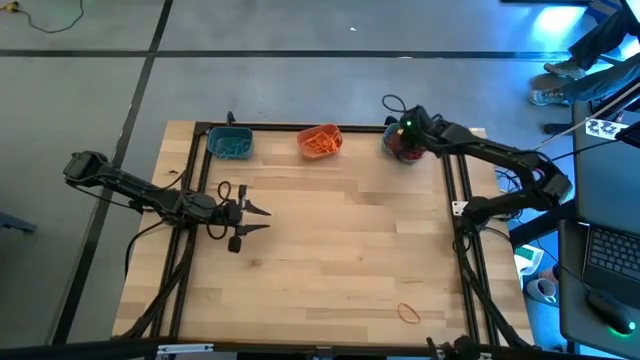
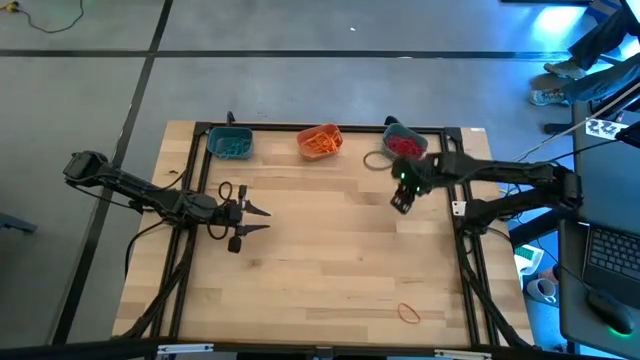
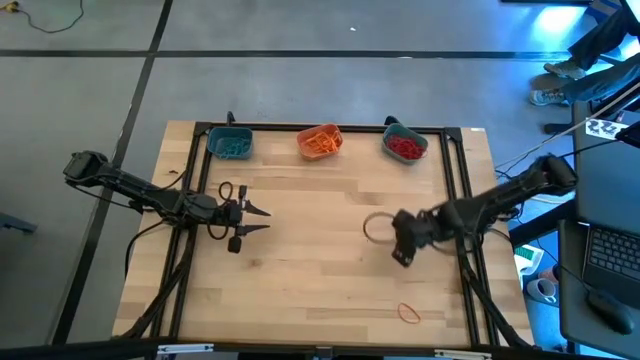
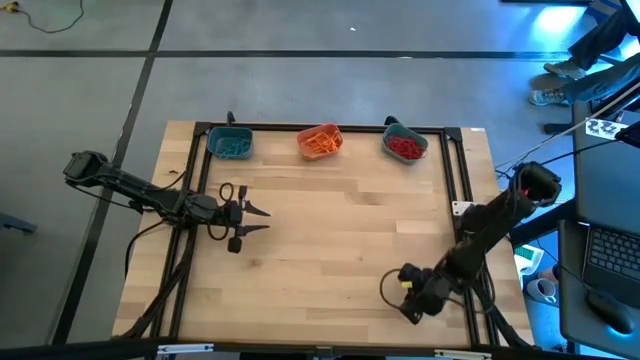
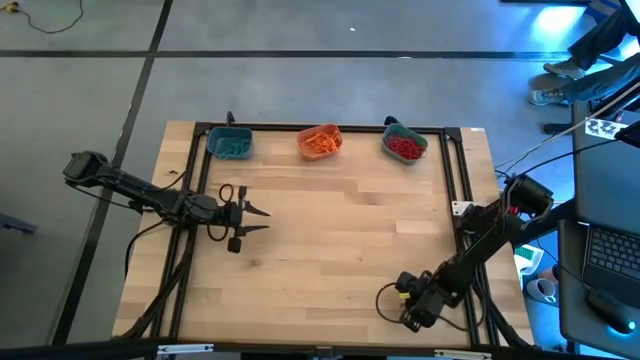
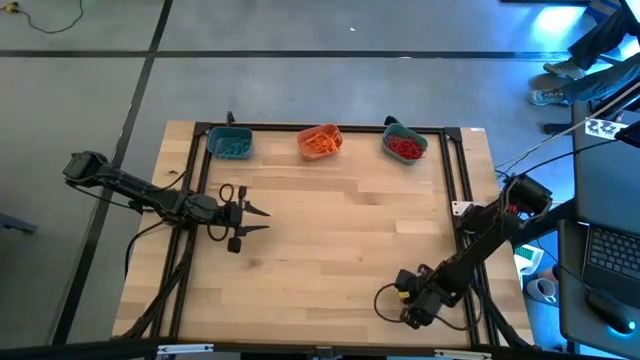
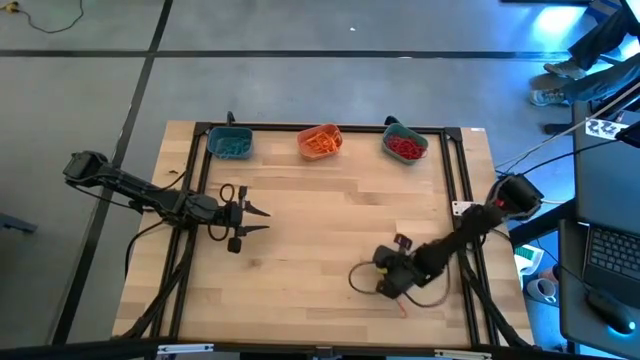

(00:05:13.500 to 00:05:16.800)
Task: Sort rubber bands into baskets
Put the orange rubber band into the orange bin

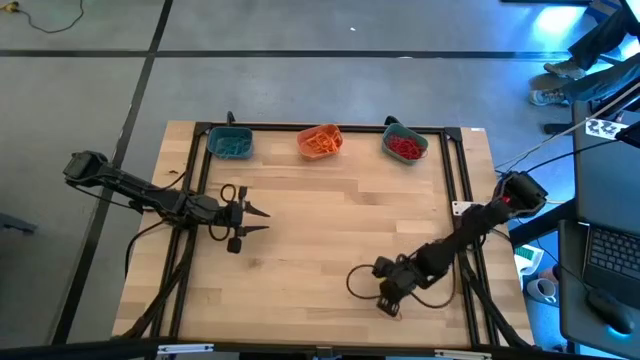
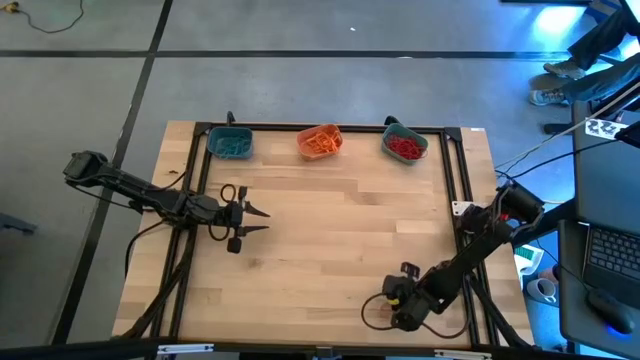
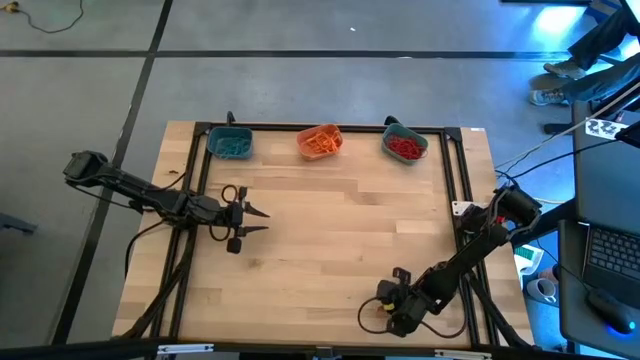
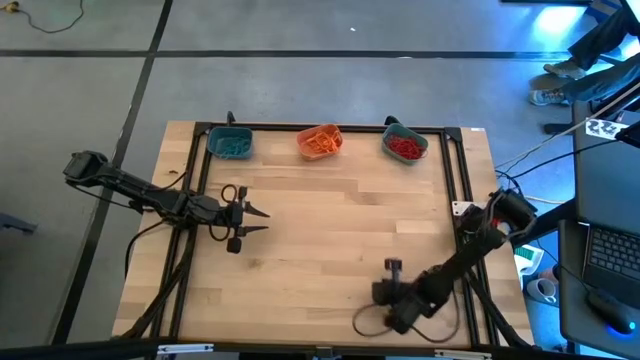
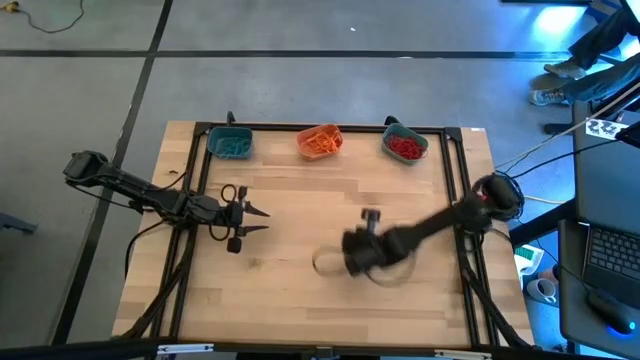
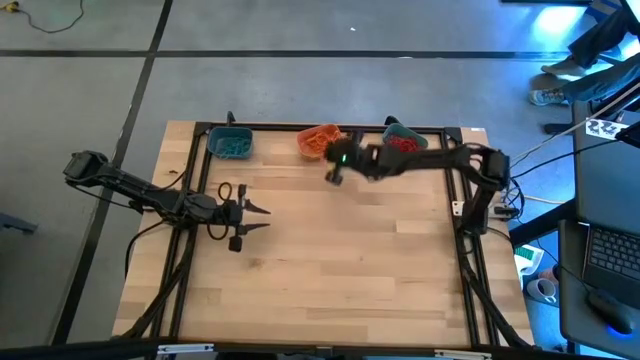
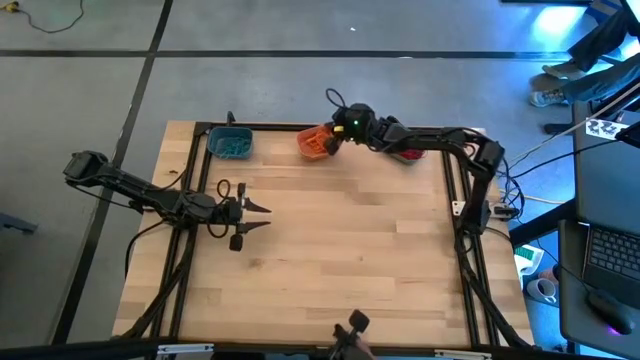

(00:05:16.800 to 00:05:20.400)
Put the orange rubber band into the orange bin

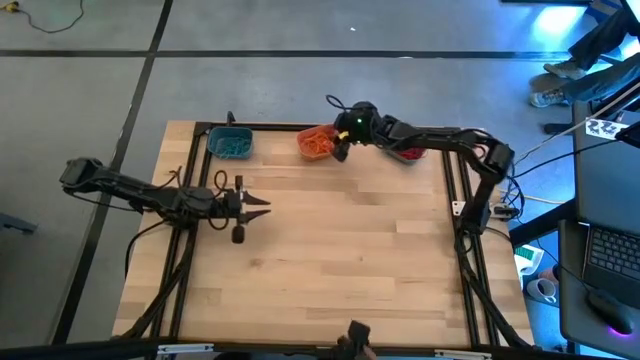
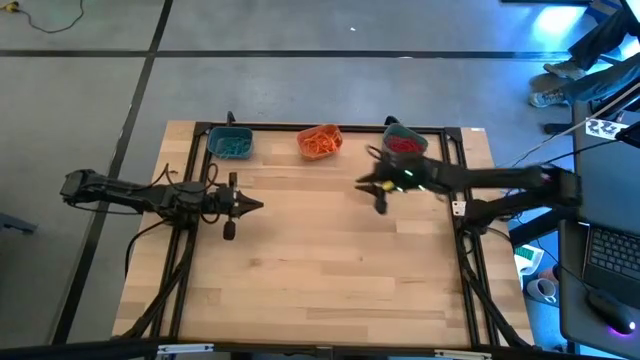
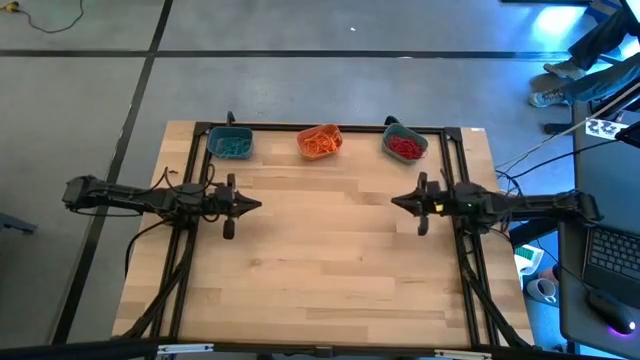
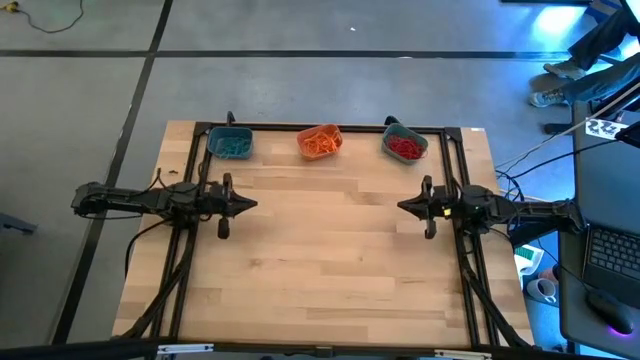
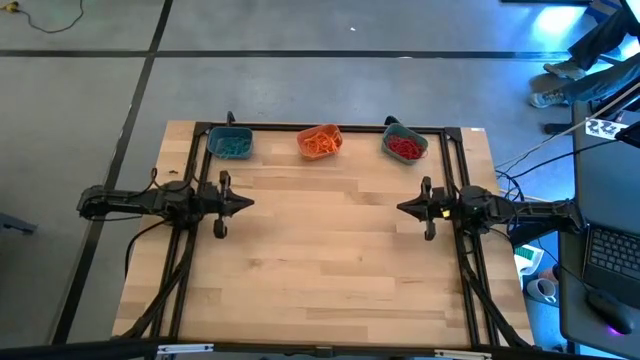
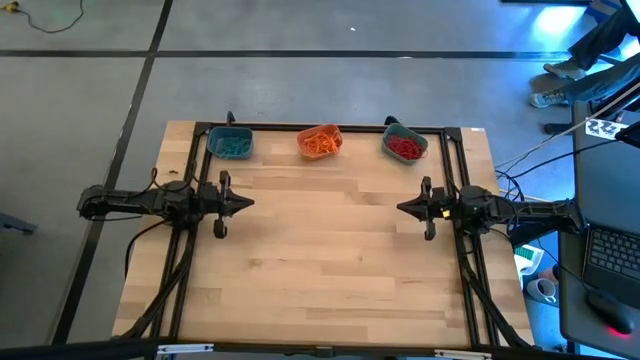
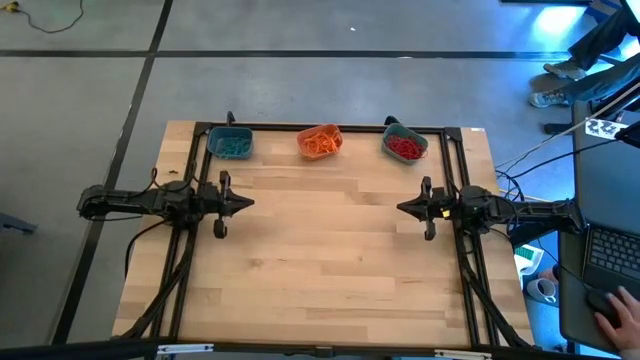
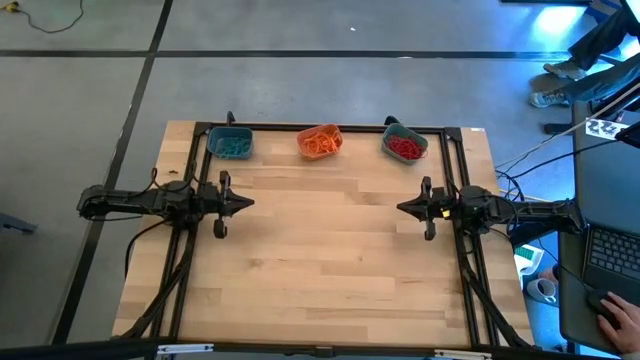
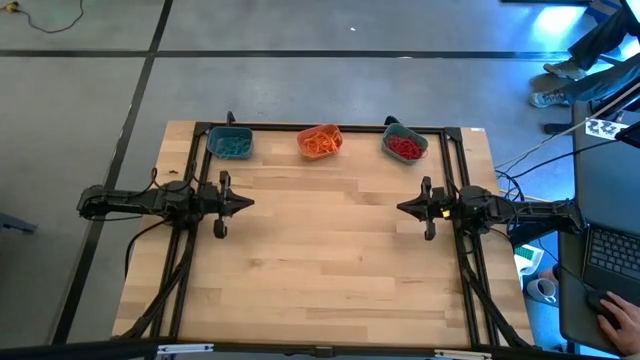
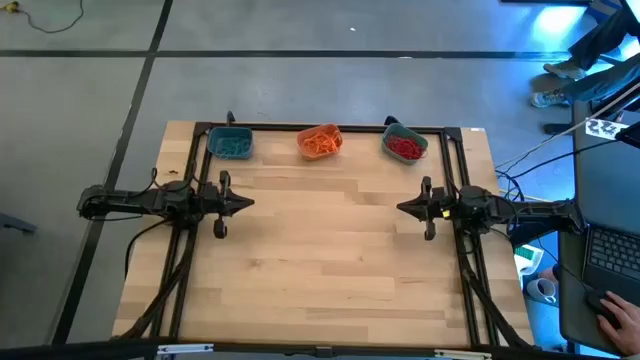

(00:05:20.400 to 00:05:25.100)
Return to Home Position

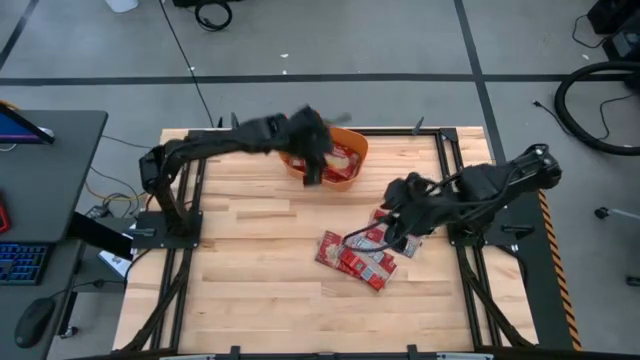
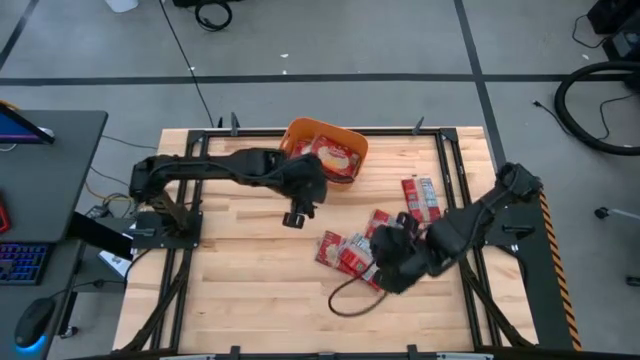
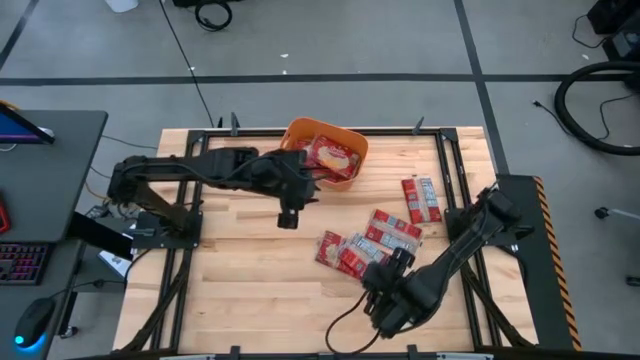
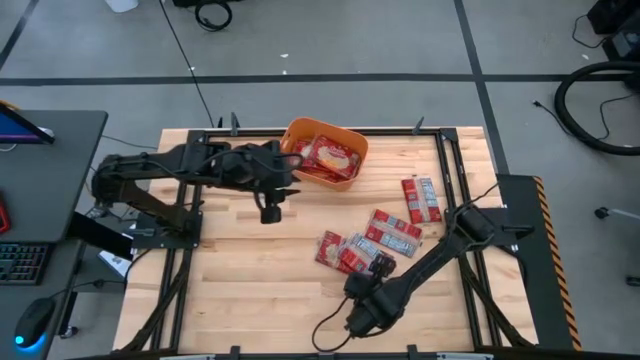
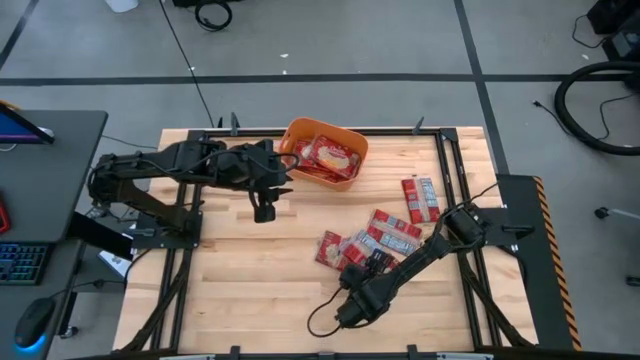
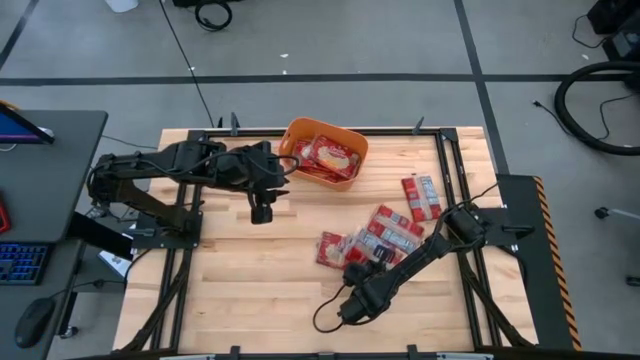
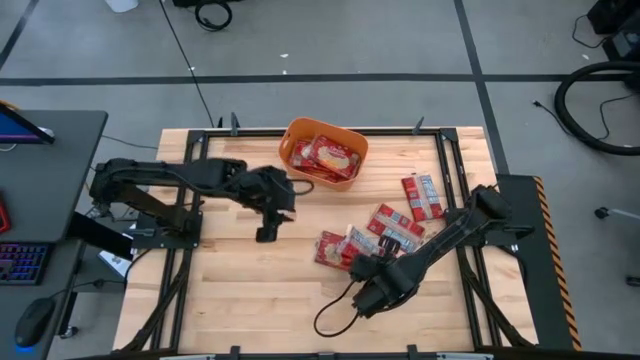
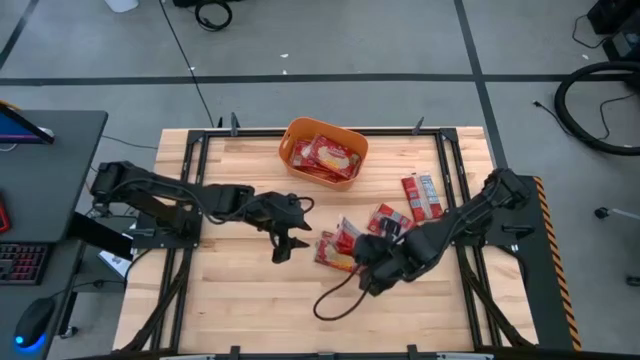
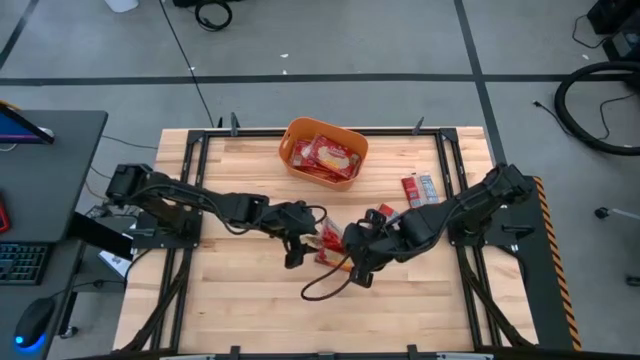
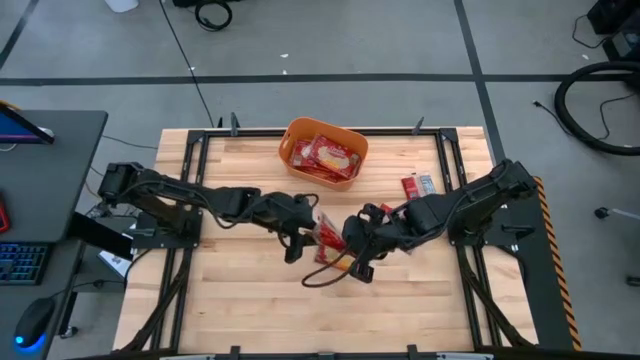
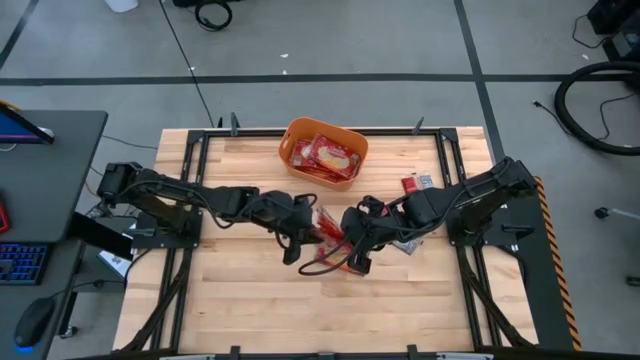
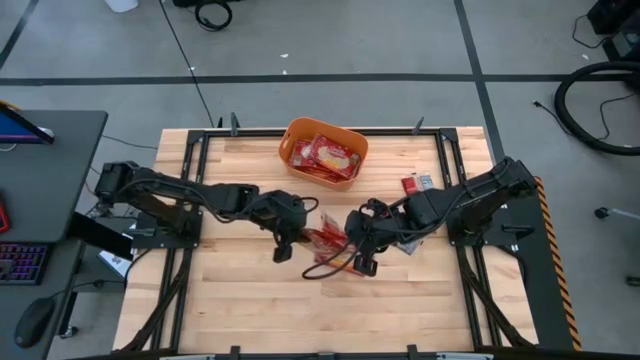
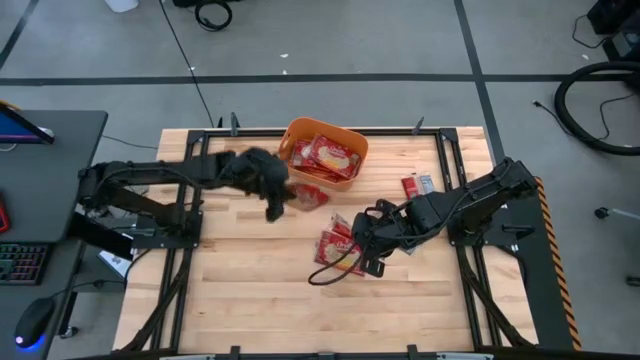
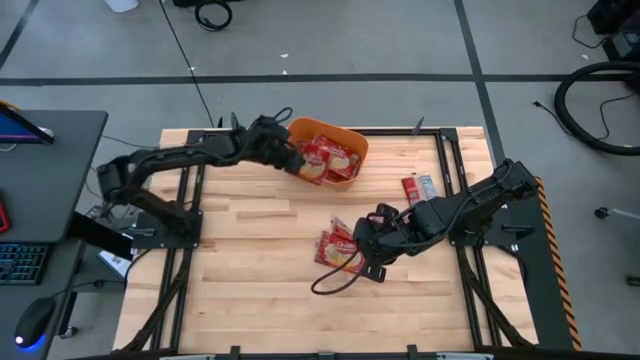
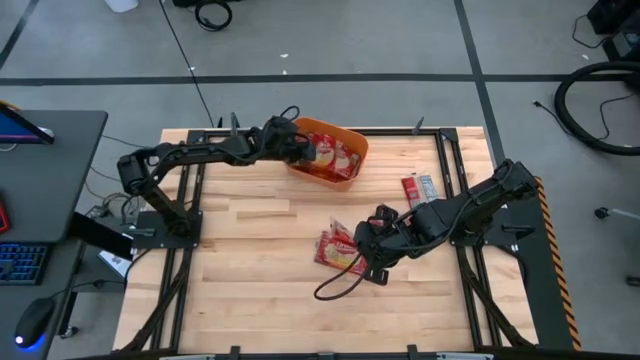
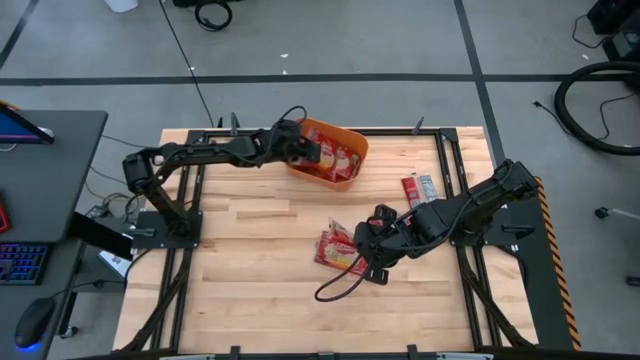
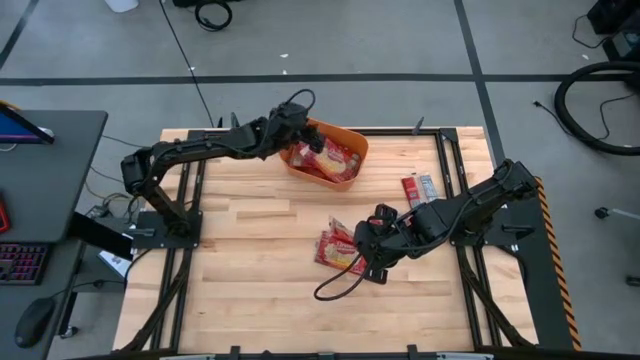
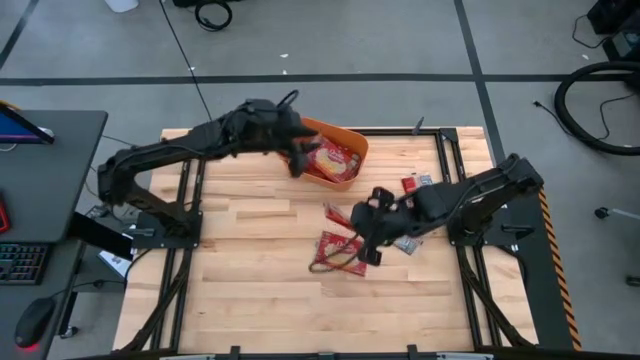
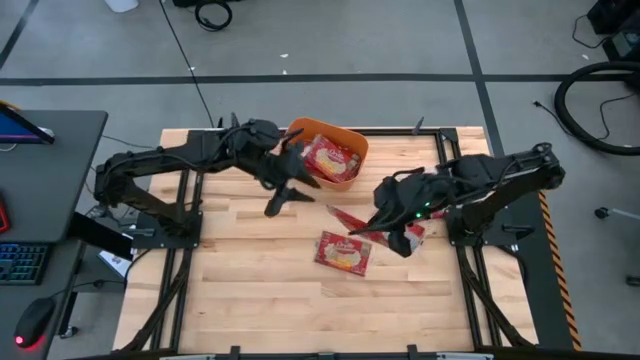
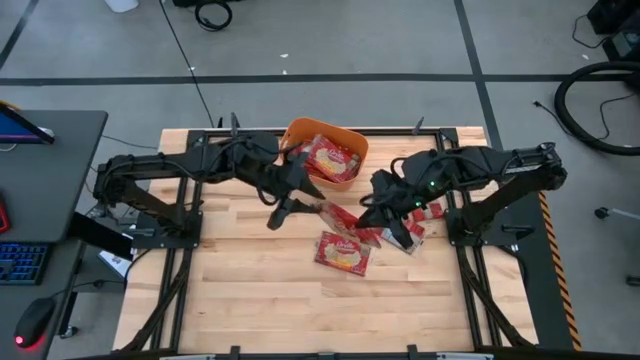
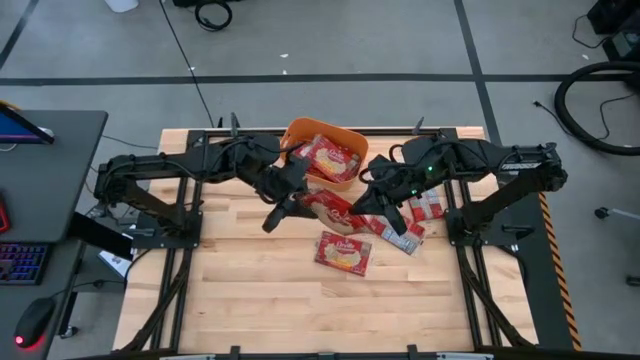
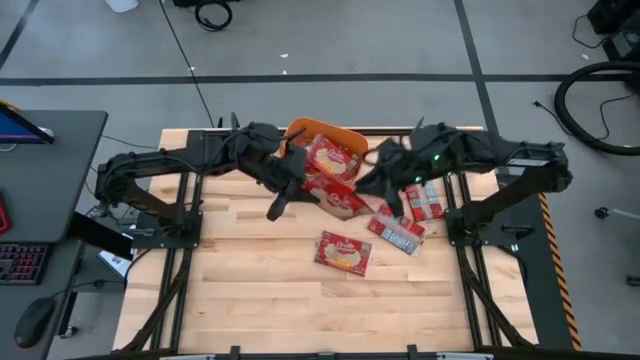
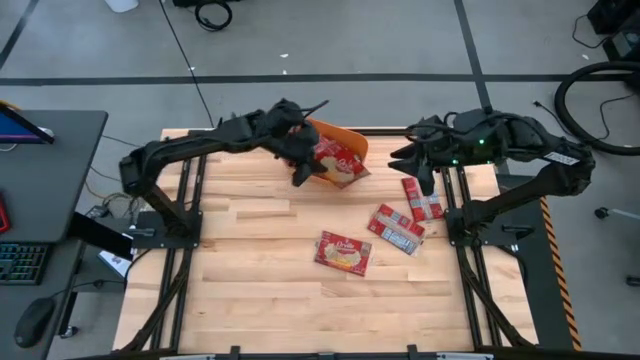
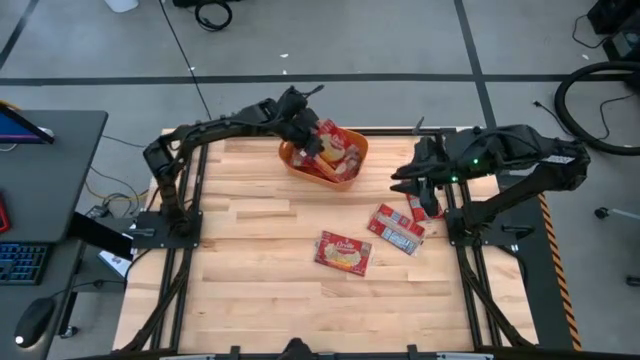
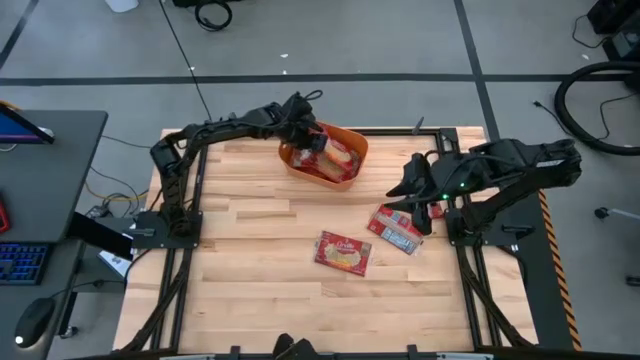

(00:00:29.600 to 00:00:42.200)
Task: Sort popcorn bags into baskets
Put the red popcorn bag into the orange bin
